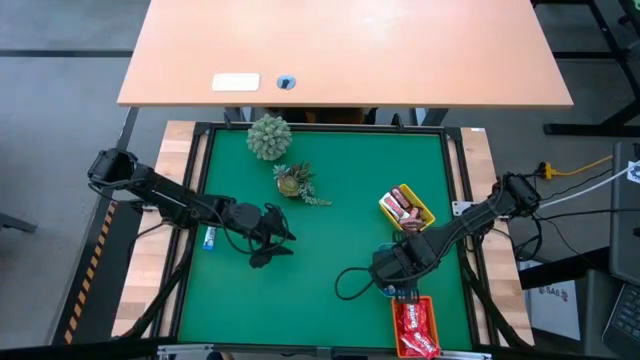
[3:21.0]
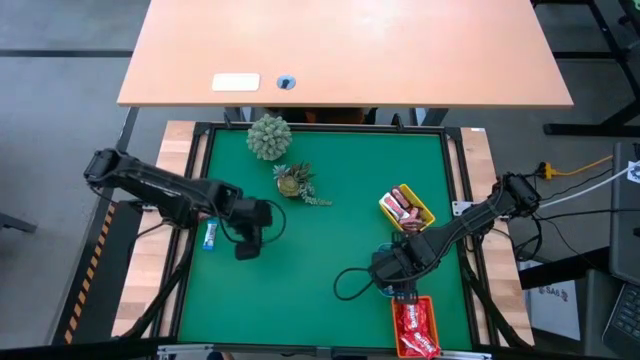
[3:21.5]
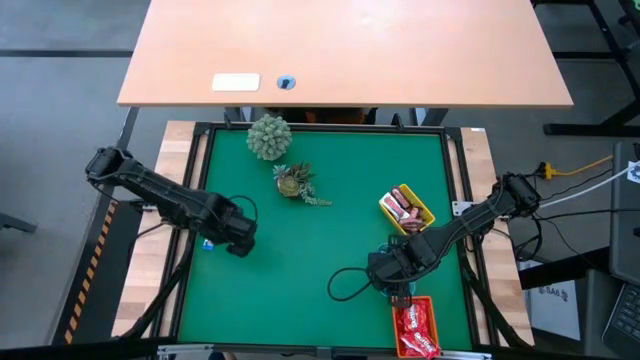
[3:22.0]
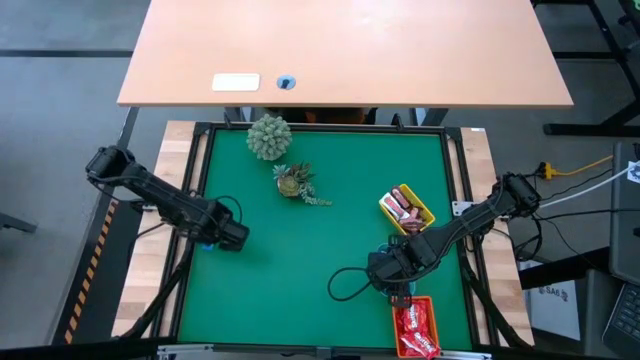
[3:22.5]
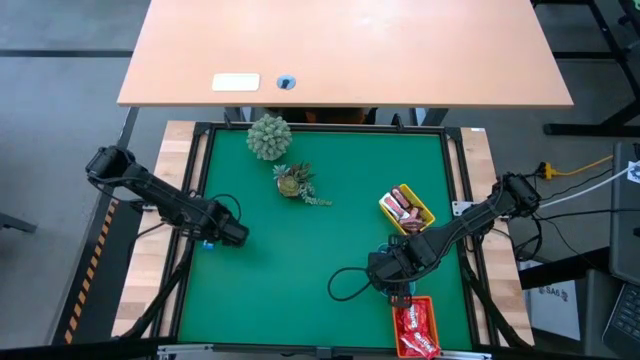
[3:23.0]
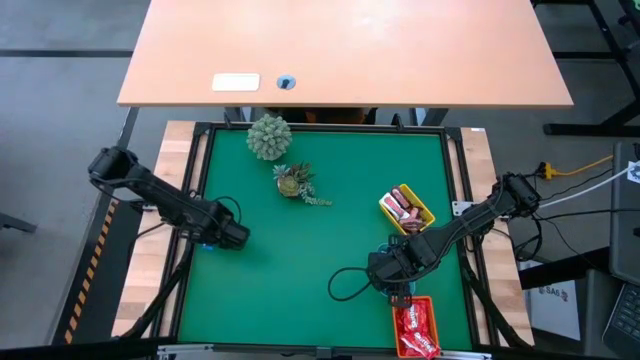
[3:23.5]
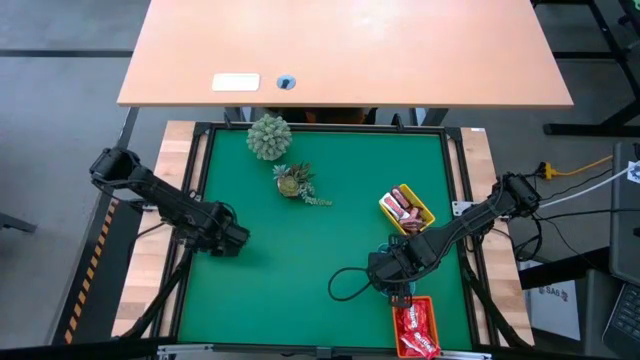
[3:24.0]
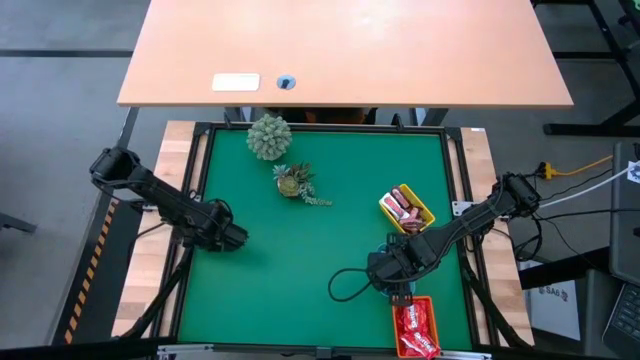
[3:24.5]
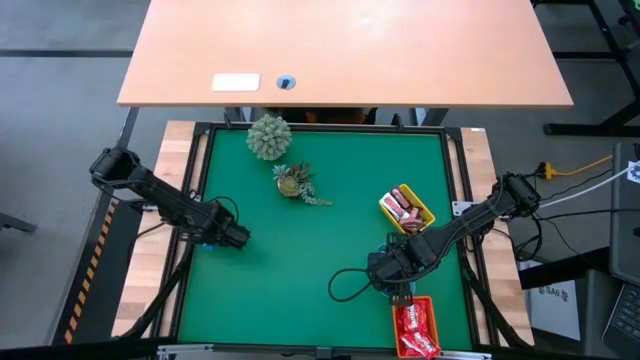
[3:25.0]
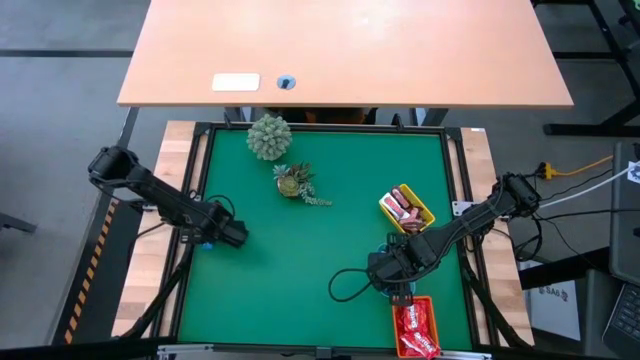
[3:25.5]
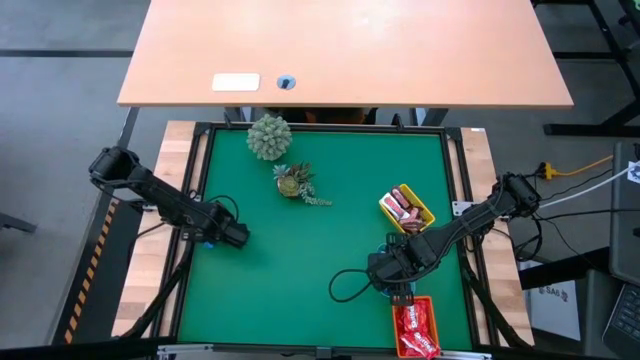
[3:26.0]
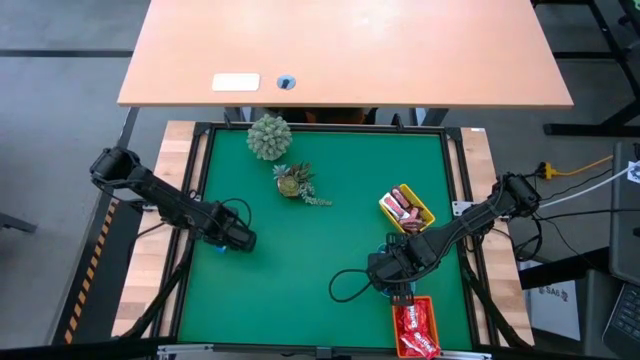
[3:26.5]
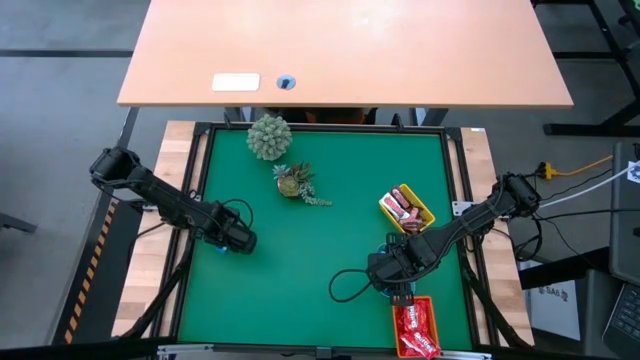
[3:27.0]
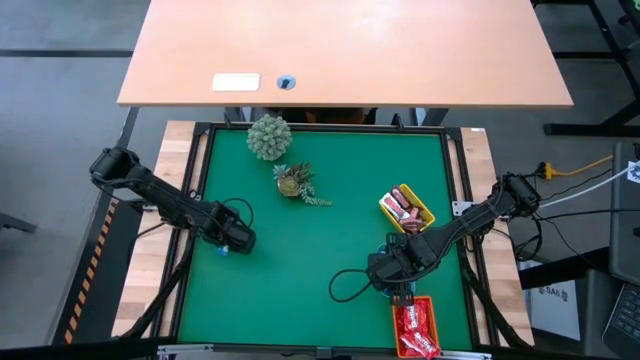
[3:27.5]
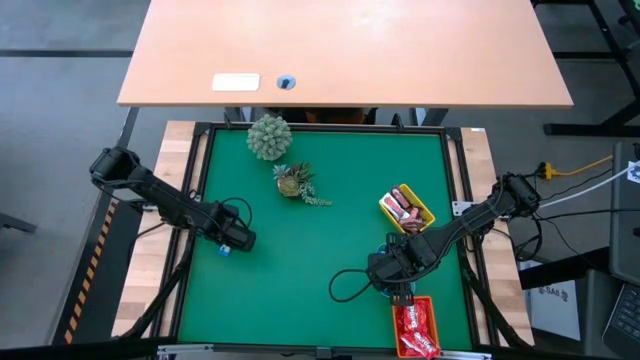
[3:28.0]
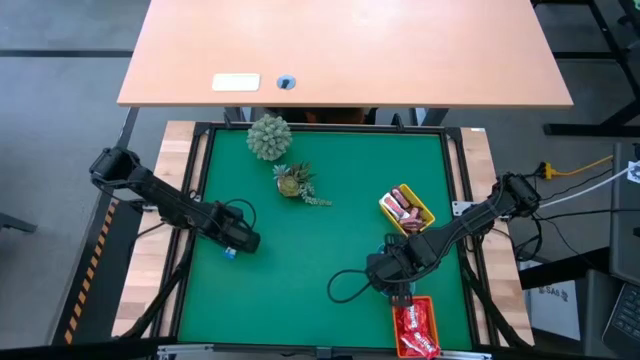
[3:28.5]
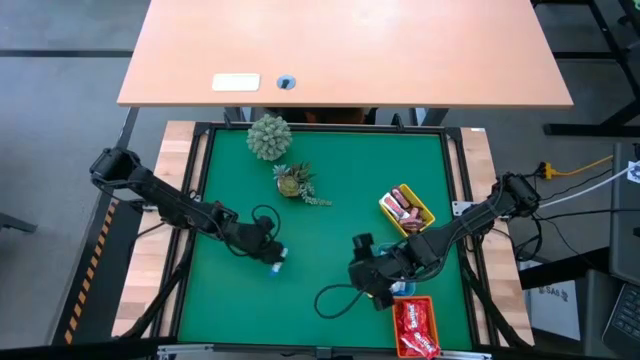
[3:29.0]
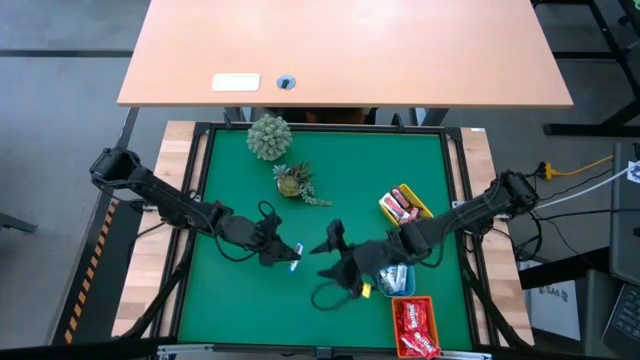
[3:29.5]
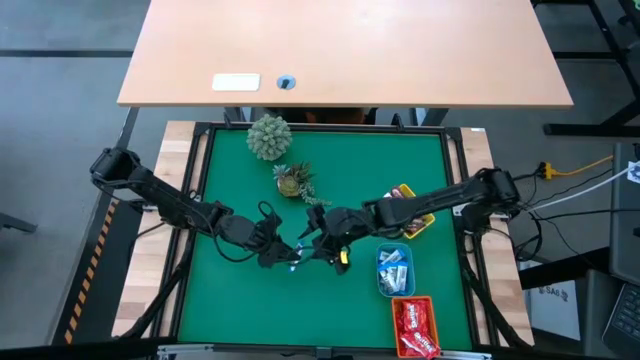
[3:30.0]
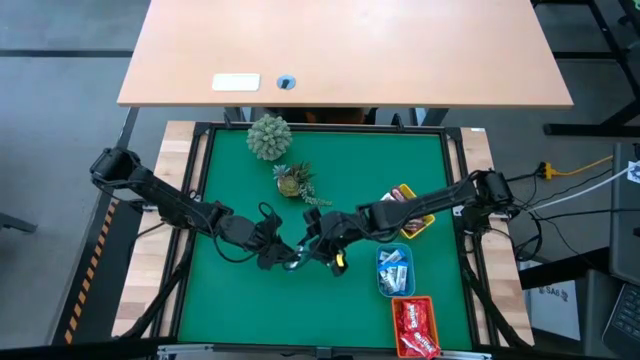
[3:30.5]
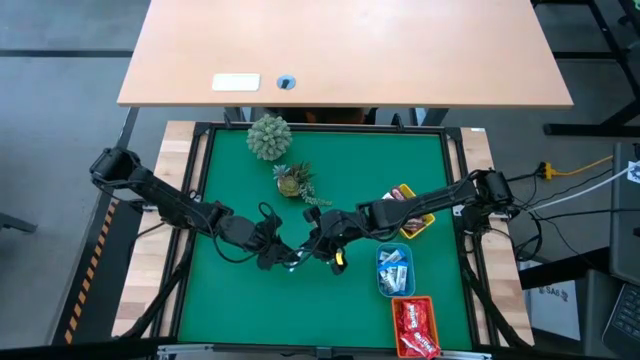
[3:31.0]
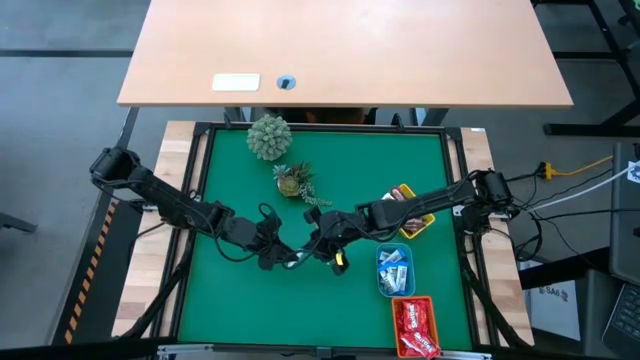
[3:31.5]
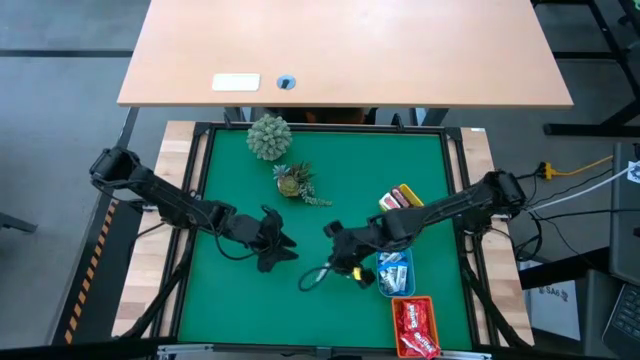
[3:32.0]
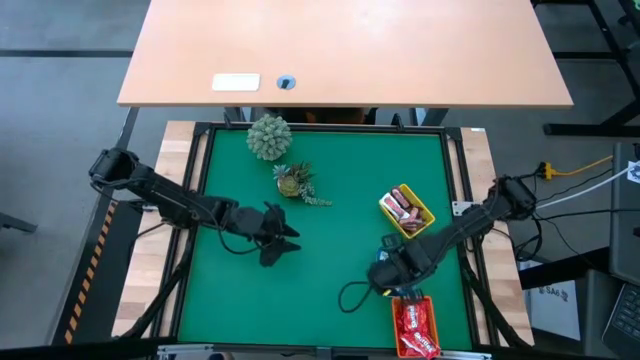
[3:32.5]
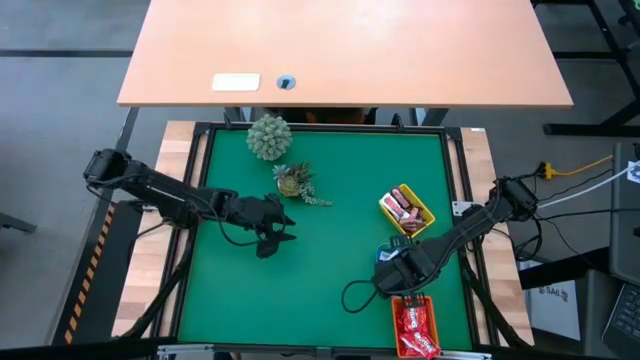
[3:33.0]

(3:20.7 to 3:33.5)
Task: Sort candy
Put the white chocolate into the blue bin

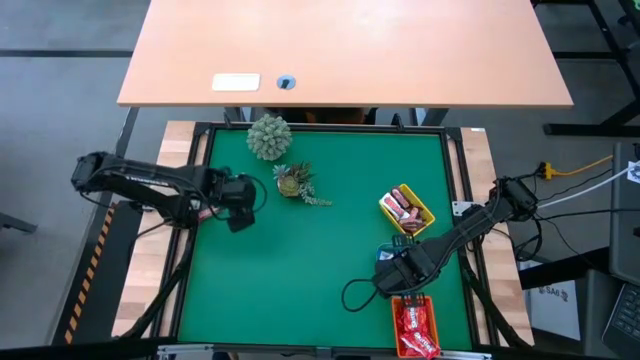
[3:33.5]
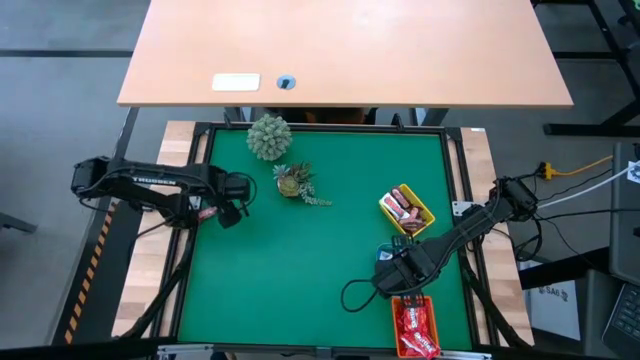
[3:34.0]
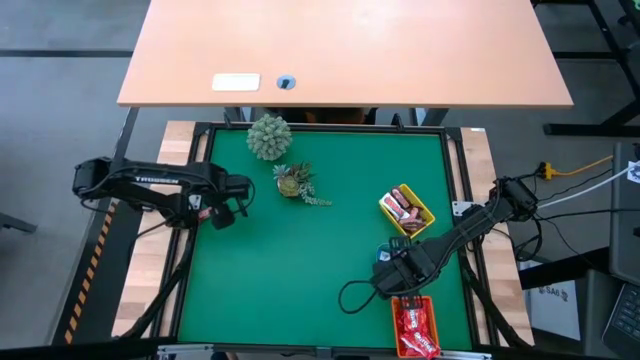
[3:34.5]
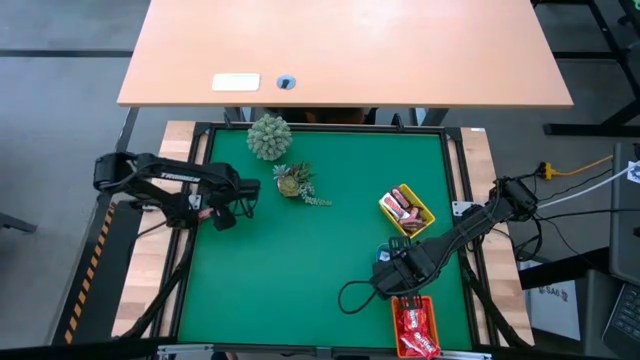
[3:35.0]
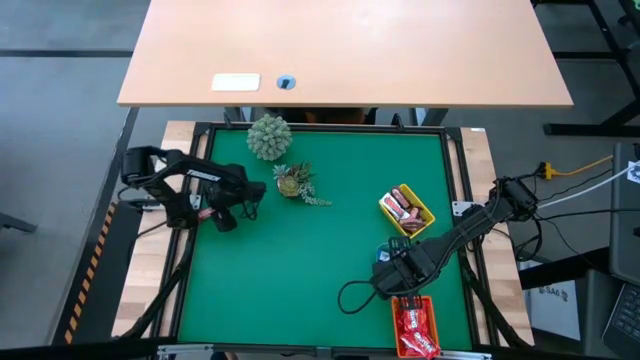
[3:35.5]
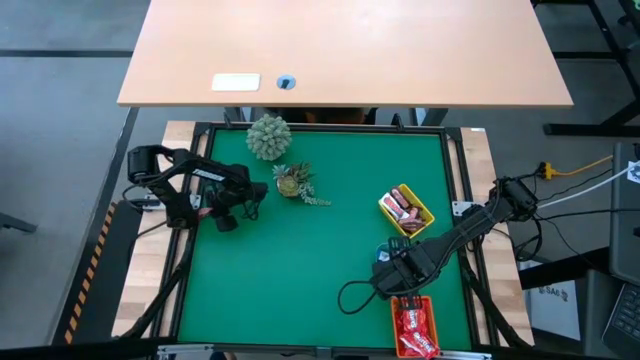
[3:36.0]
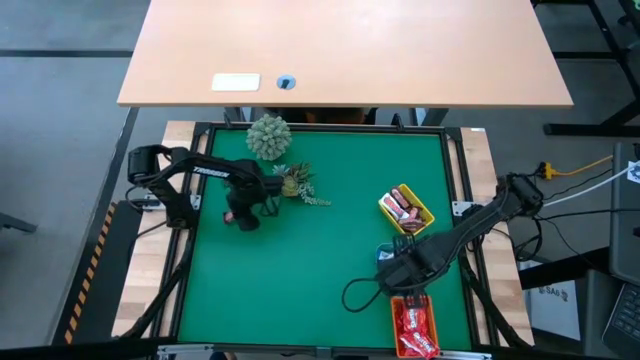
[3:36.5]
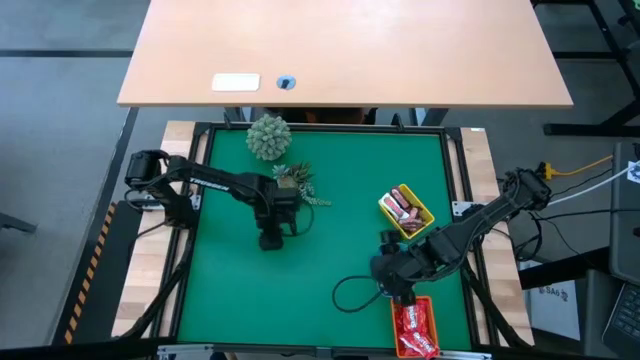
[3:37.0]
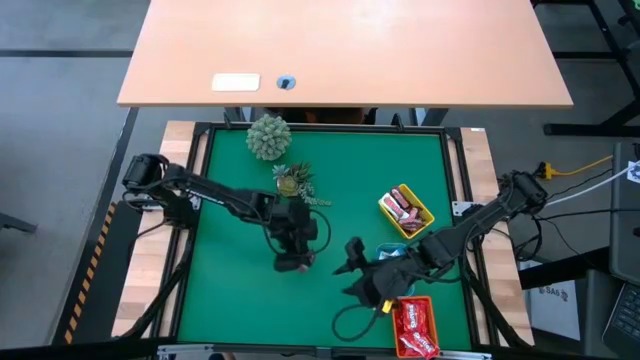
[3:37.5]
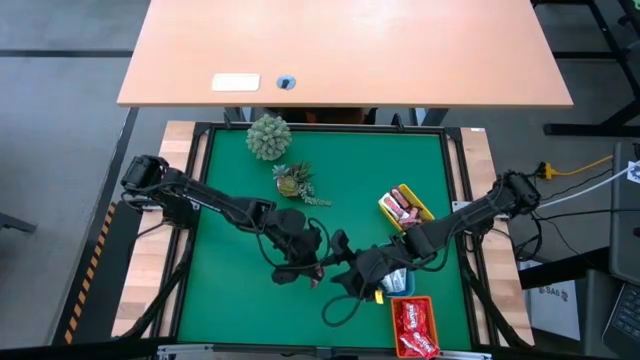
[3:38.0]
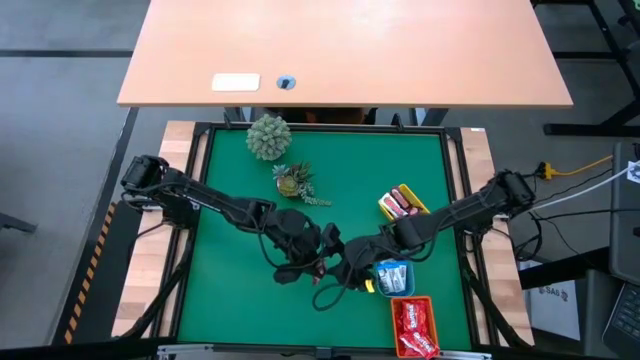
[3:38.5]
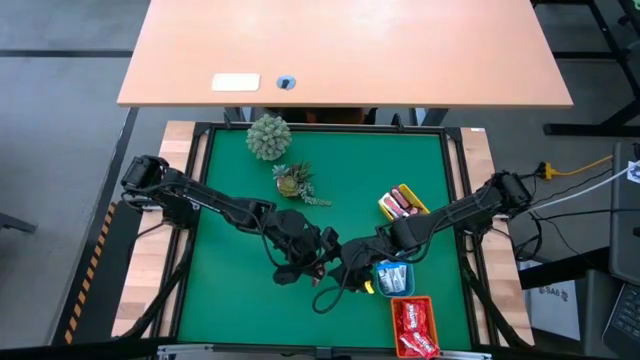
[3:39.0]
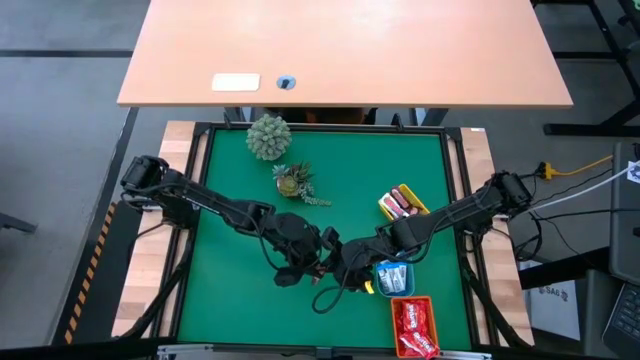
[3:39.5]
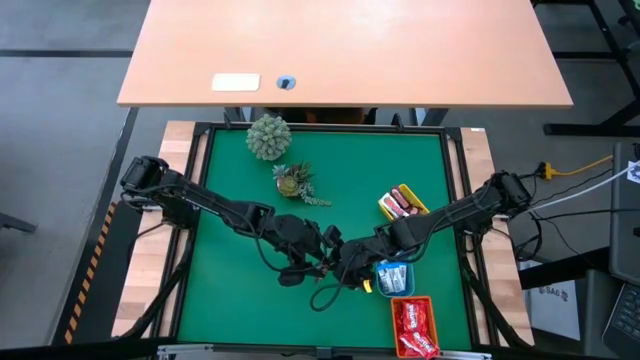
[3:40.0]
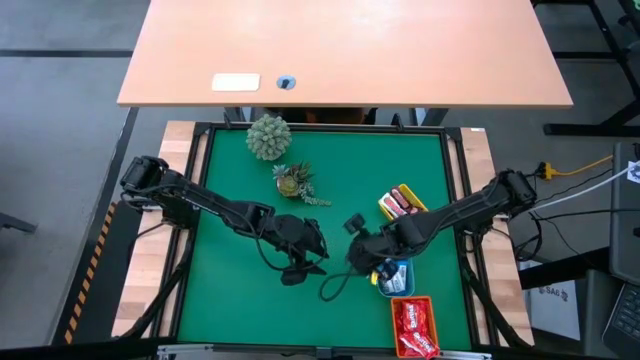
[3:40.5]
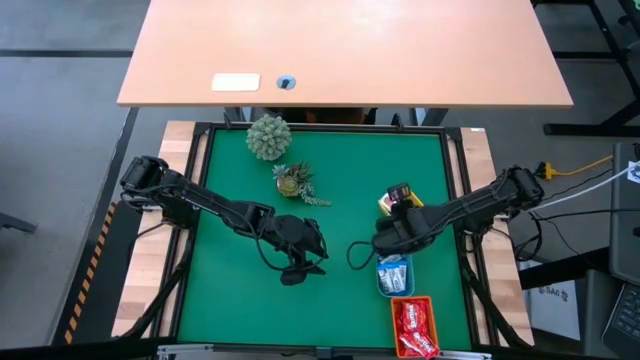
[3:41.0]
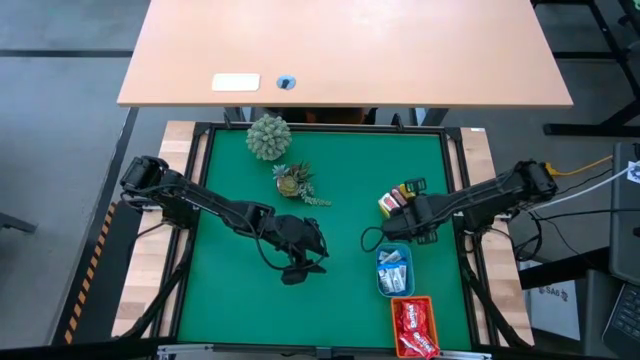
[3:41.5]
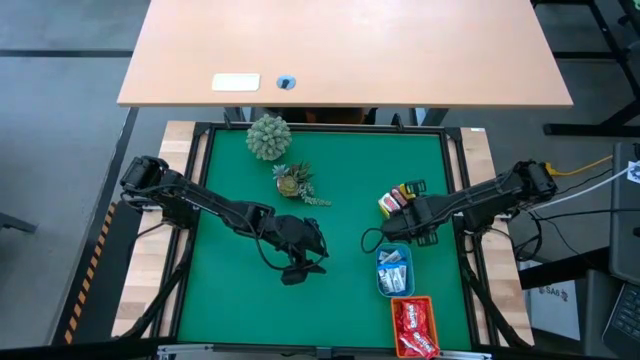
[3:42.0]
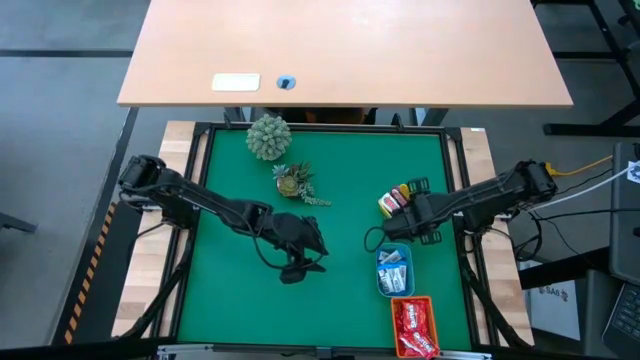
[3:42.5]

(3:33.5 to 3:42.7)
Put the brown candy into the yellow bin
